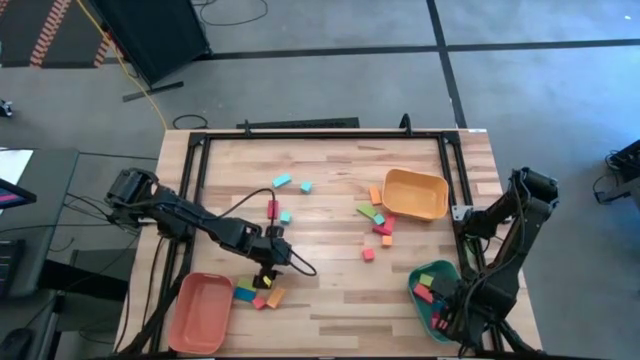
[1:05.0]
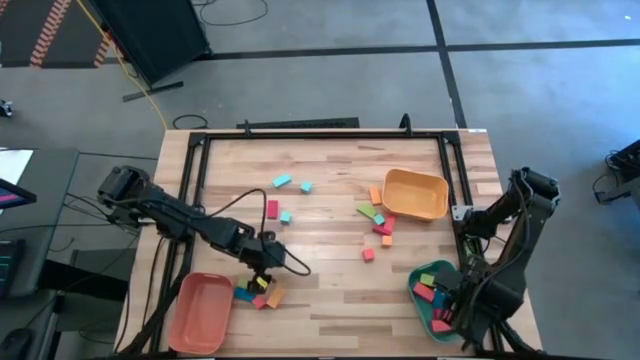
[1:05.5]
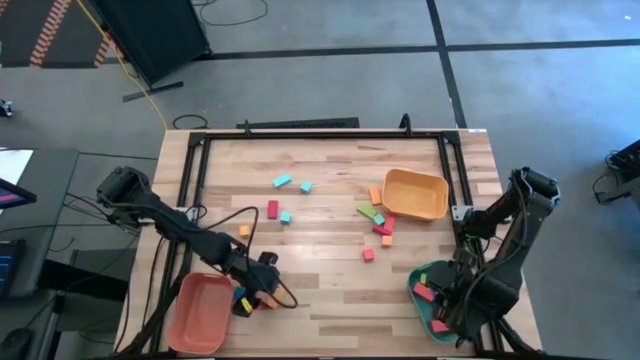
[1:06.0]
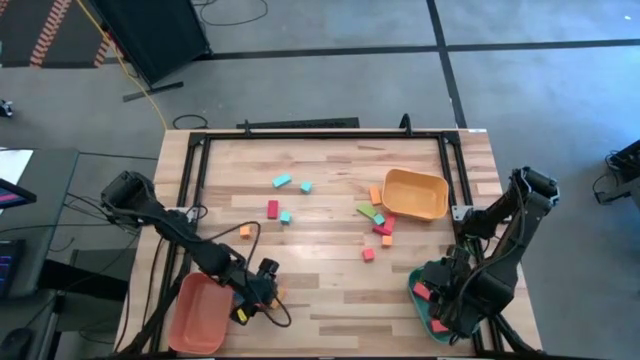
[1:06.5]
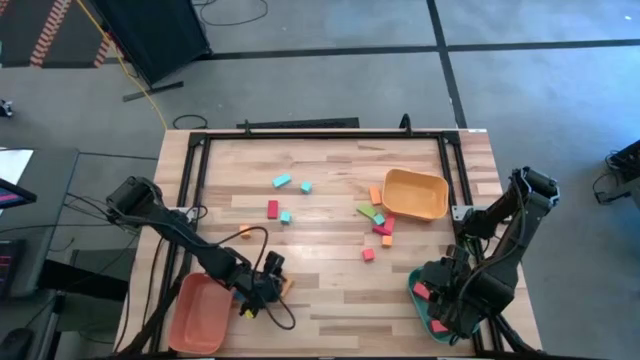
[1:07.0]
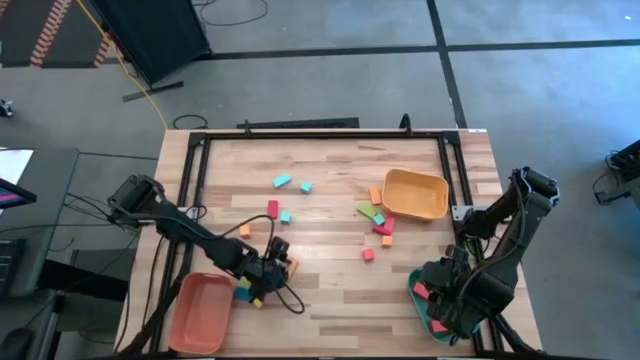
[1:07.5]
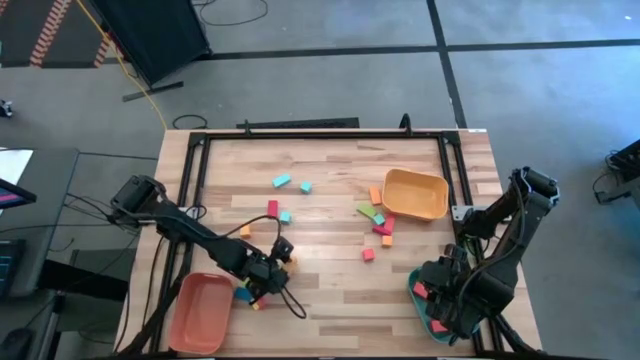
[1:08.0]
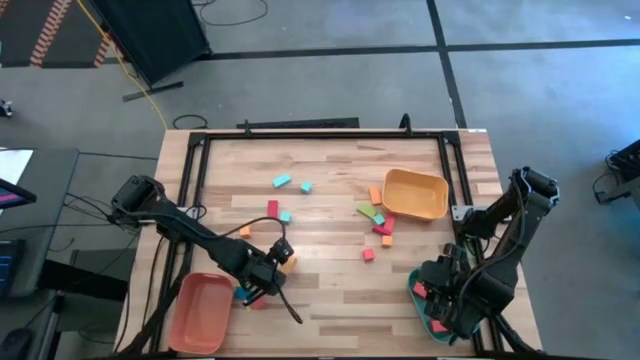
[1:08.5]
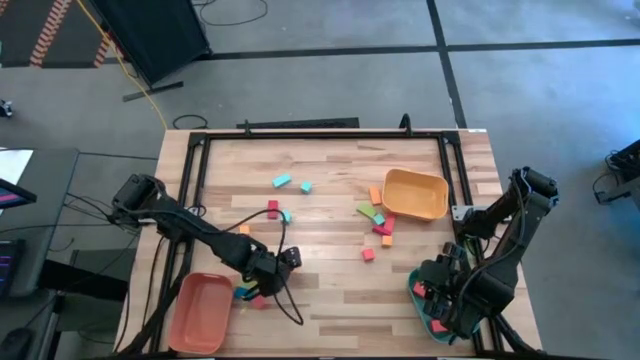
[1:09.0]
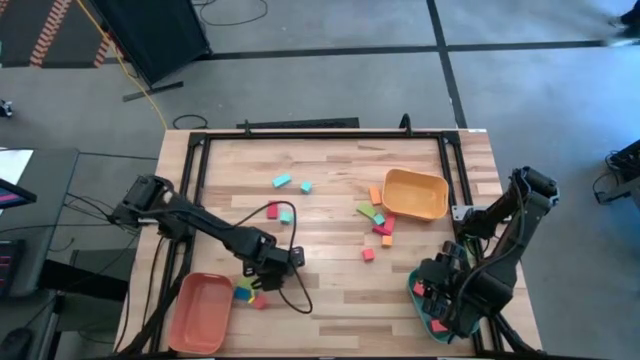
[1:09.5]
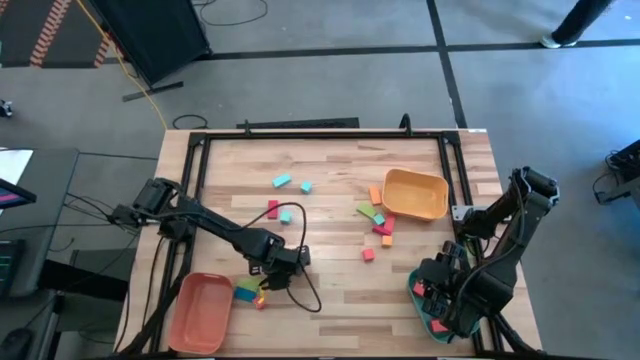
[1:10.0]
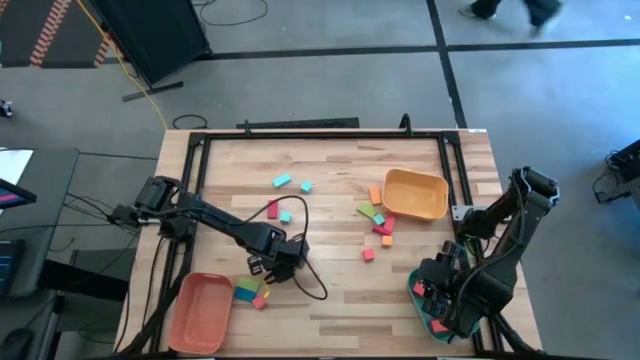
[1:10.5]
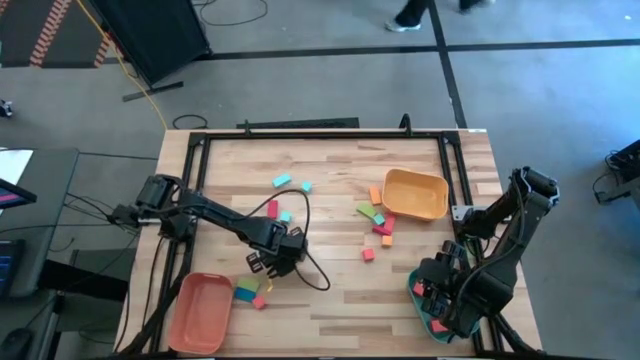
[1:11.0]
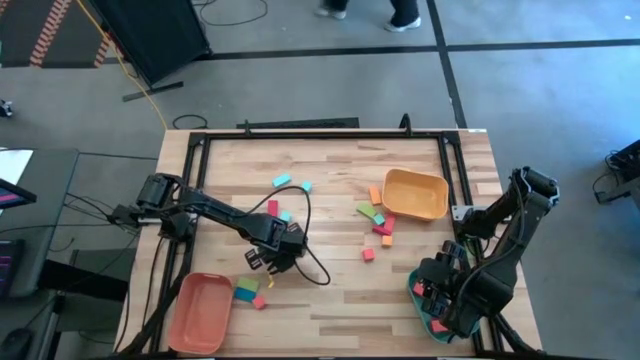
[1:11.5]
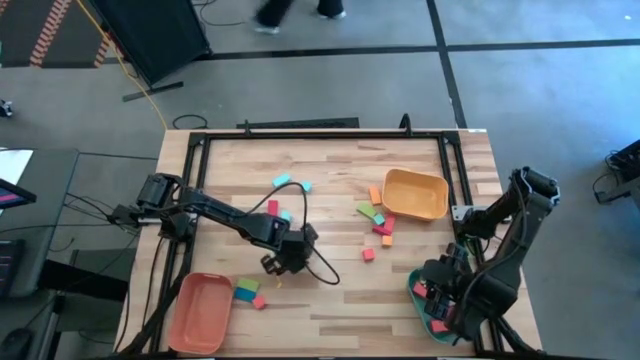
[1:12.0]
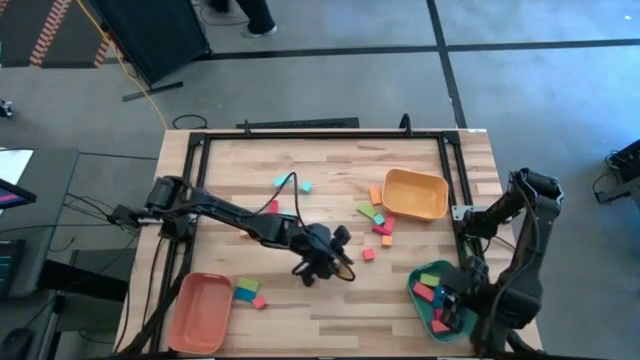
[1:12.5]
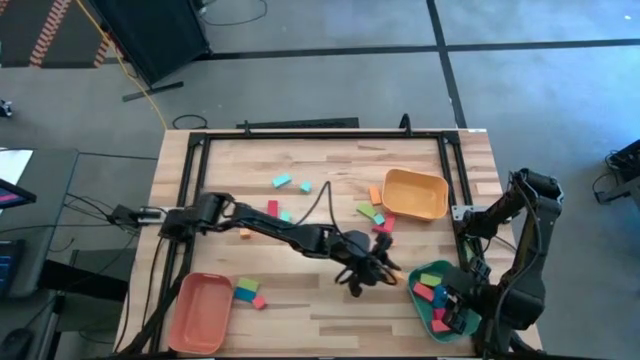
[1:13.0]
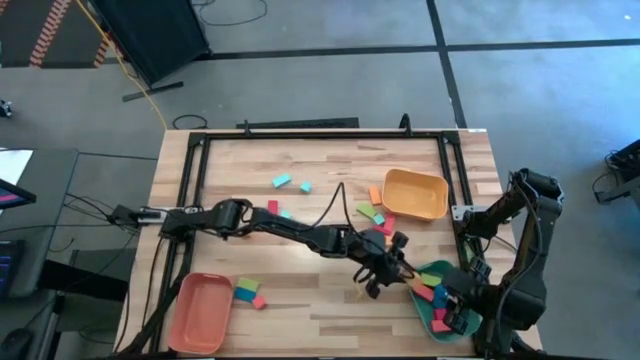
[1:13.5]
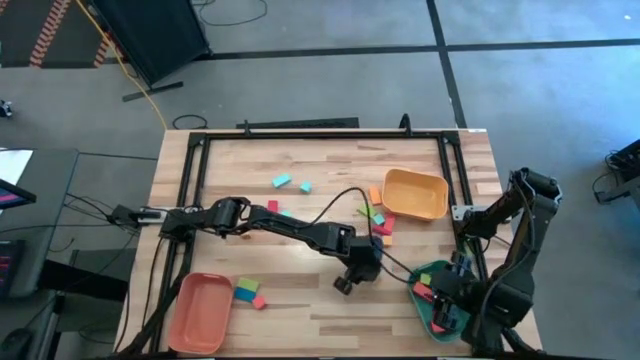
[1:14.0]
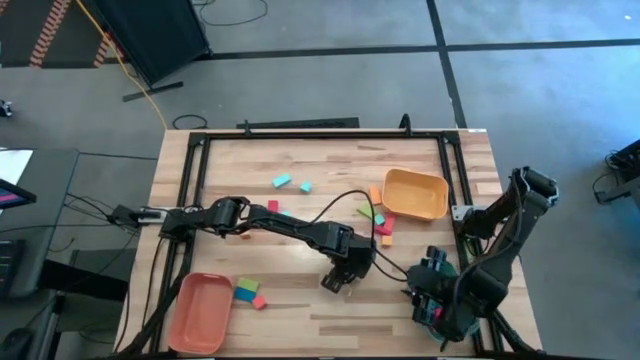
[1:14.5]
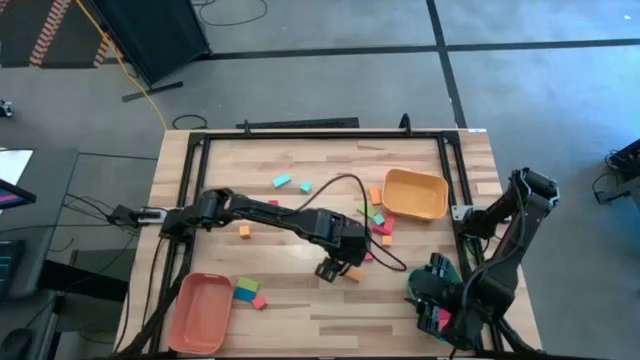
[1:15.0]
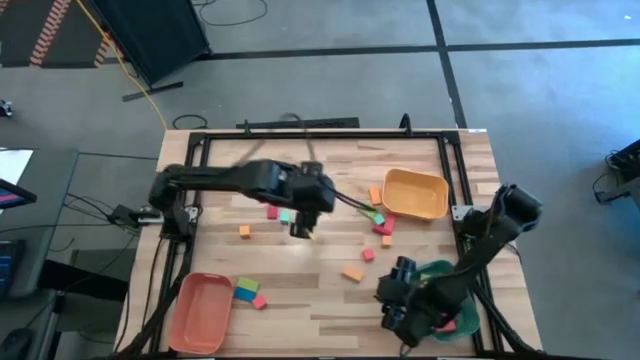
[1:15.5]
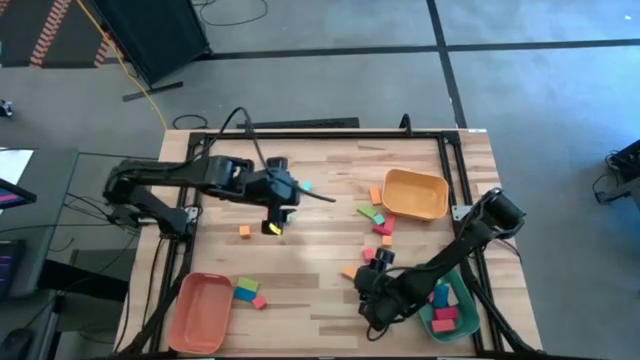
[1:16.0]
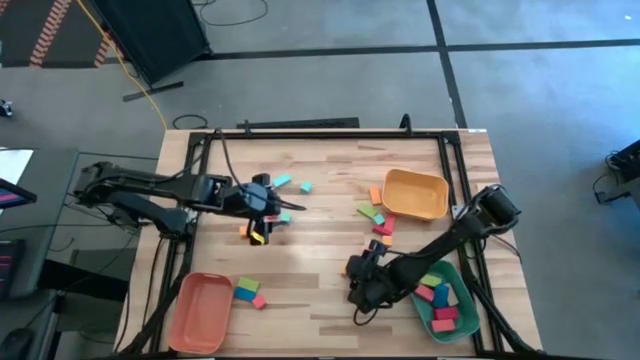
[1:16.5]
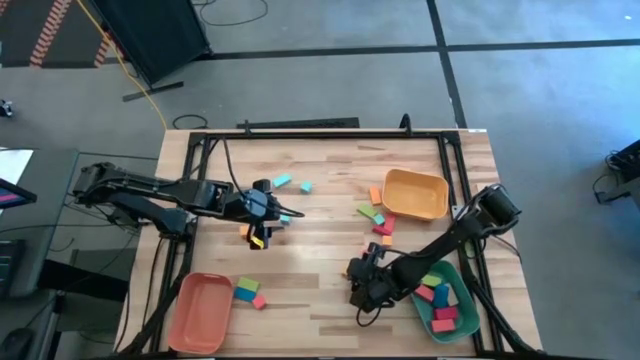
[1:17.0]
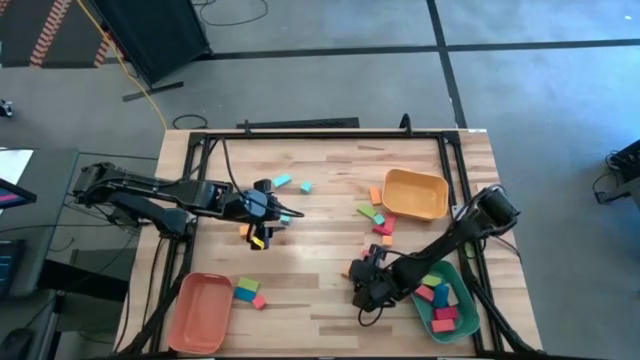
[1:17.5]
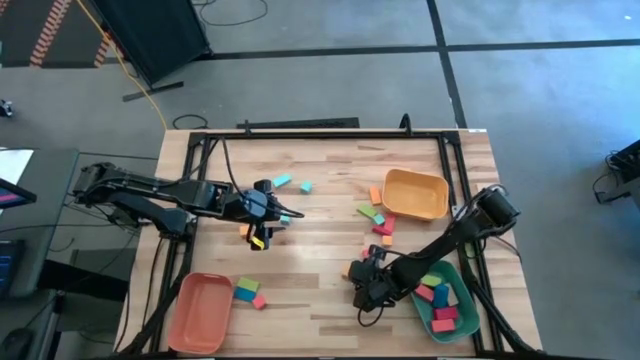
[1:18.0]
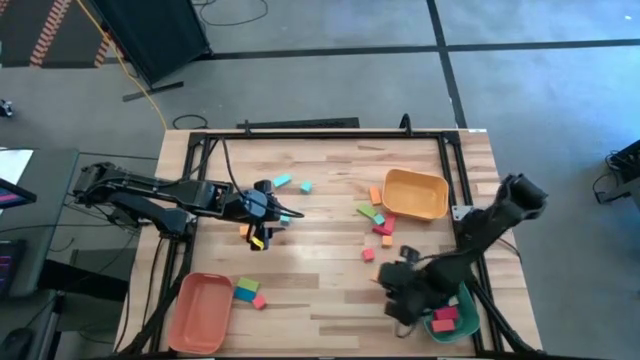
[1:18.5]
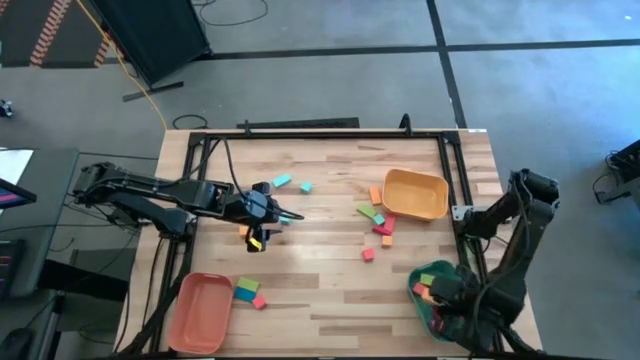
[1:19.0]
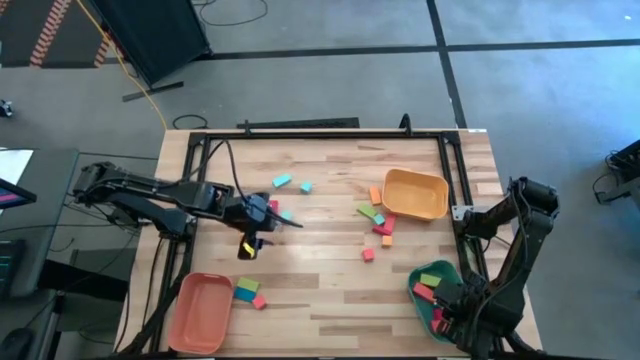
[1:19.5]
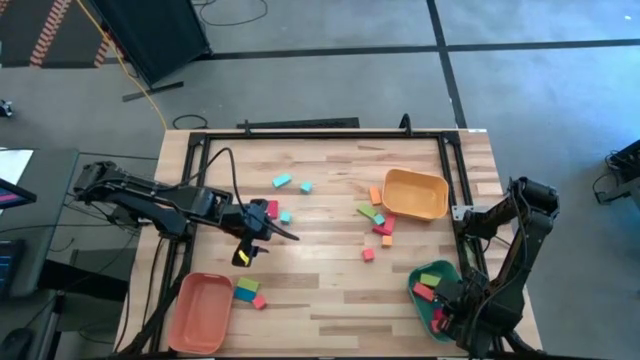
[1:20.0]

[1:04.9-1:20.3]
Task: Sort blocks by size
Put the large yellow block into the green bin

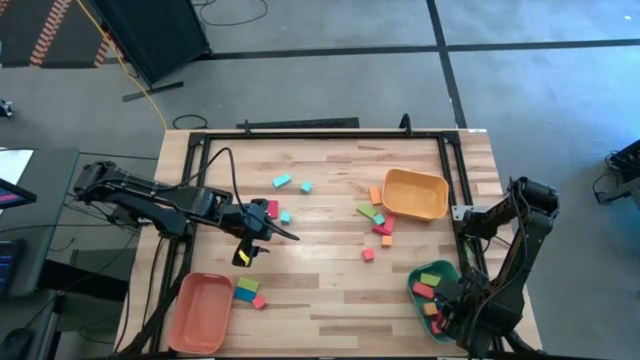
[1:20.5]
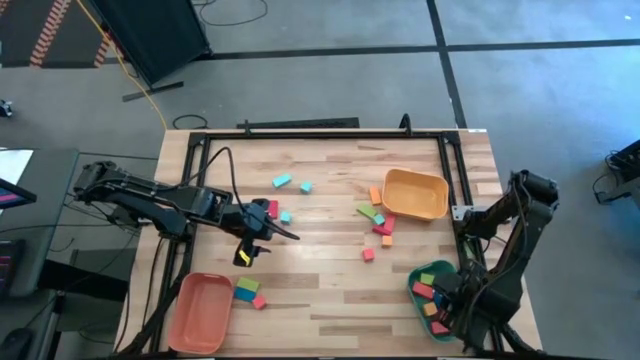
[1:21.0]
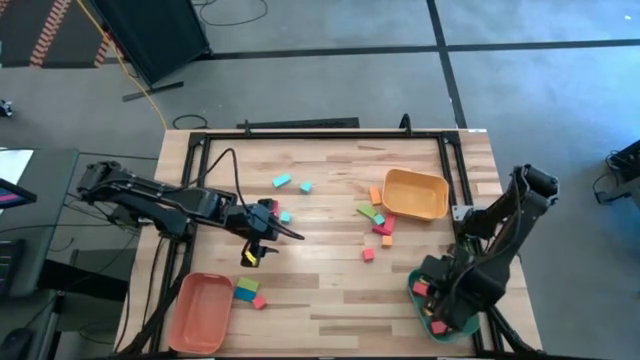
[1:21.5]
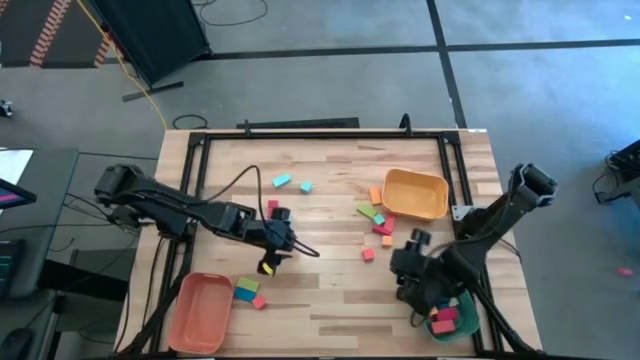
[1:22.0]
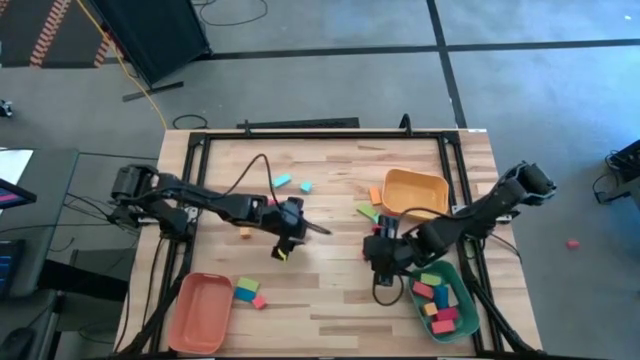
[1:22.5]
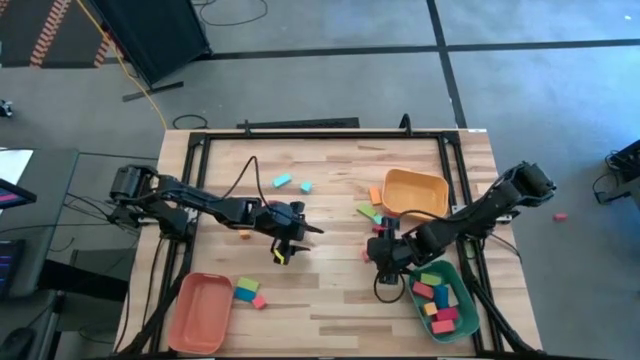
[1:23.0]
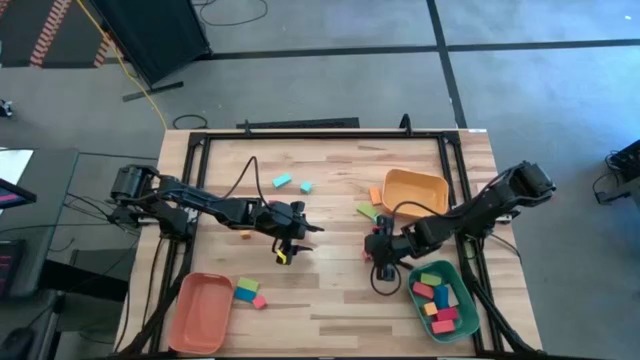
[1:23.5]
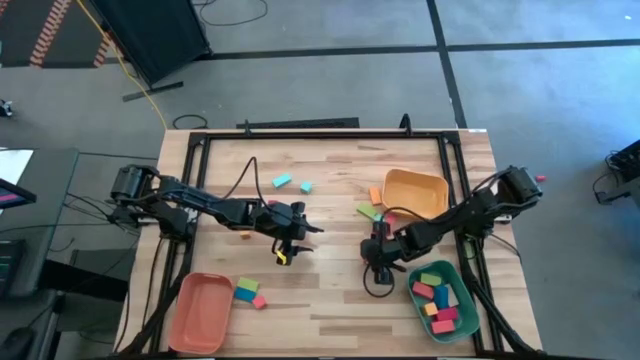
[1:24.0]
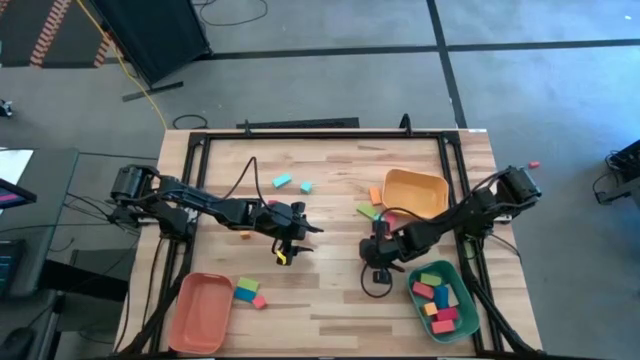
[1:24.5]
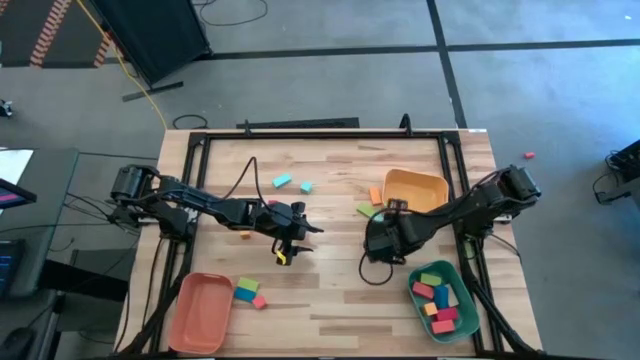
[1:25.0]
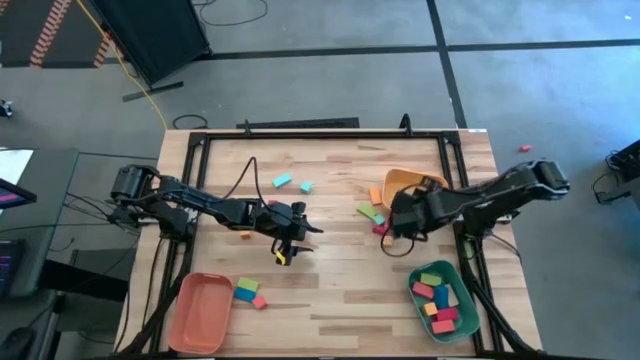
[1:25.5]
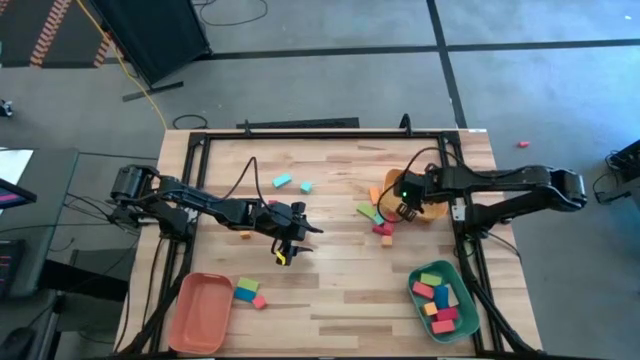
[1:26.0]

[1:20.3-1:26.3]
Put the small orange block into the yellow bin

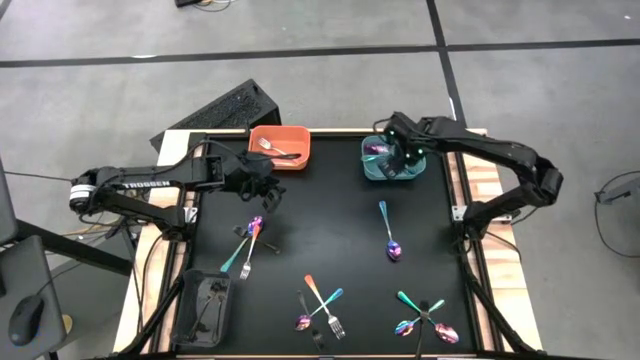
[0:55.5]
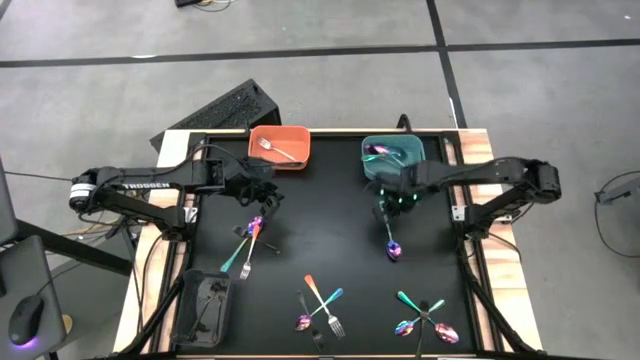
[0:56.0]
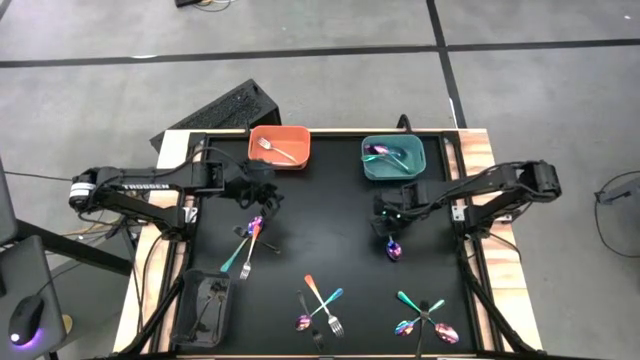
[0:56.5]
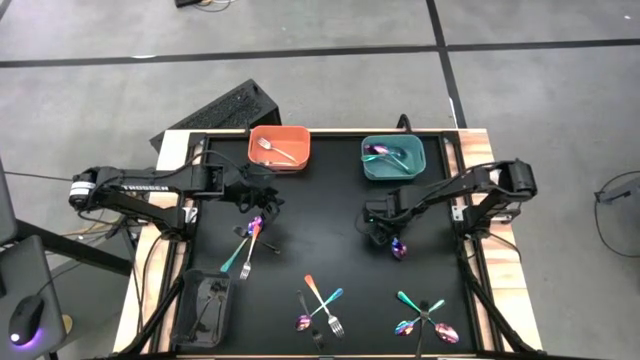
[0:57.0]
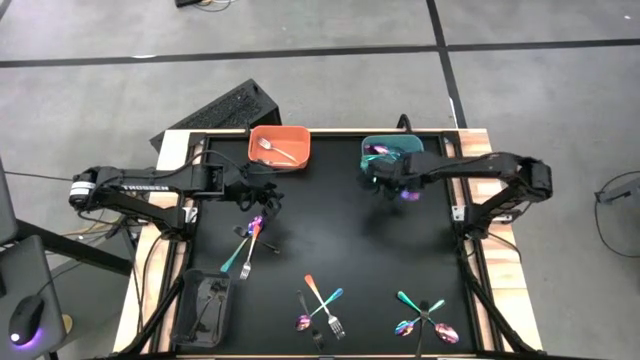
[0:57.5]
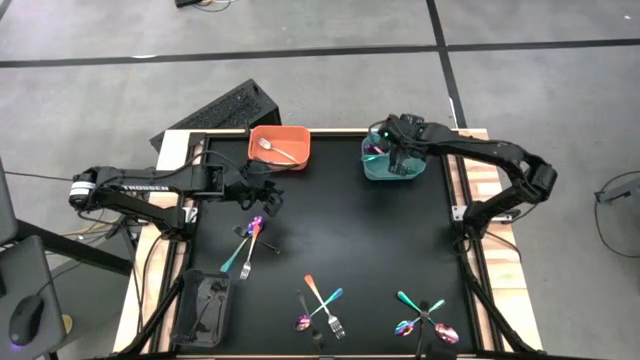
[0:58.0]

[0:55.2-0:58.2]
Task: Sort silverware by color (type)
Put the blue spoon into the blue bin
